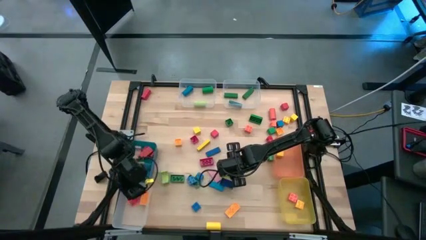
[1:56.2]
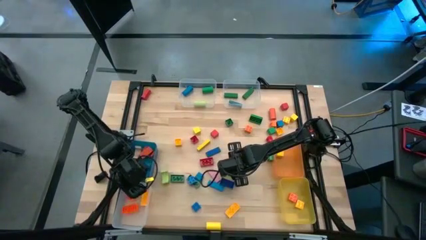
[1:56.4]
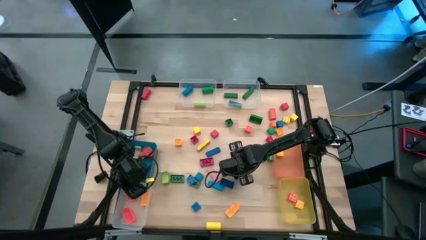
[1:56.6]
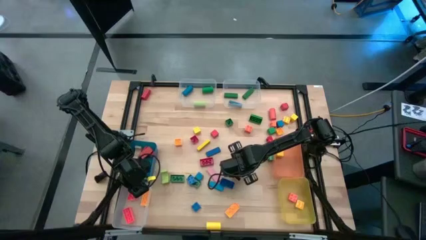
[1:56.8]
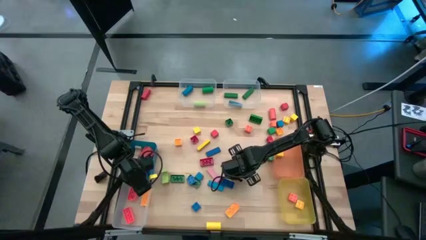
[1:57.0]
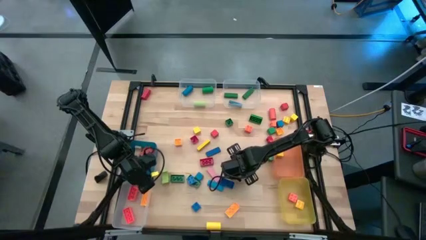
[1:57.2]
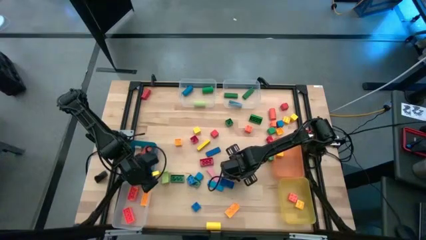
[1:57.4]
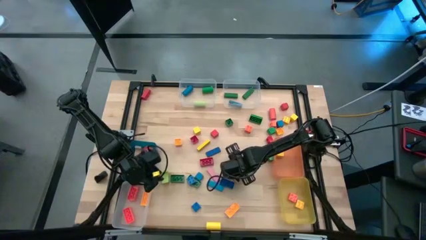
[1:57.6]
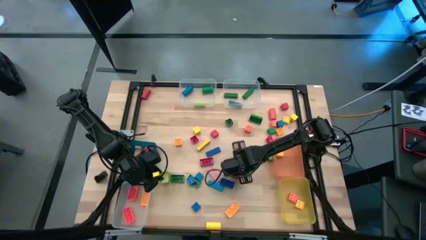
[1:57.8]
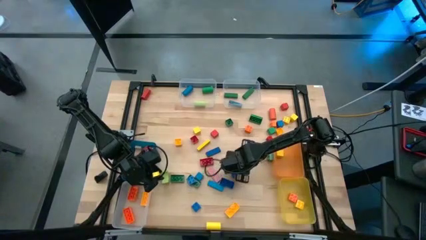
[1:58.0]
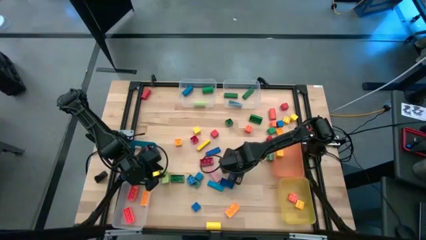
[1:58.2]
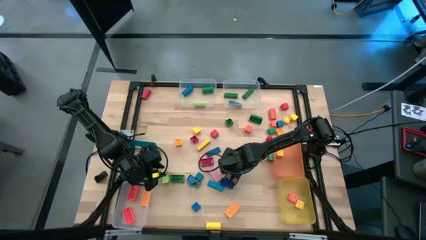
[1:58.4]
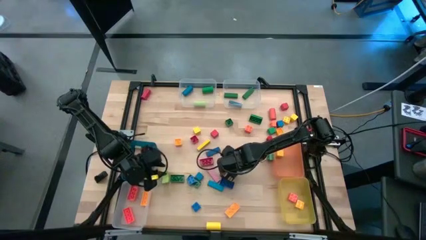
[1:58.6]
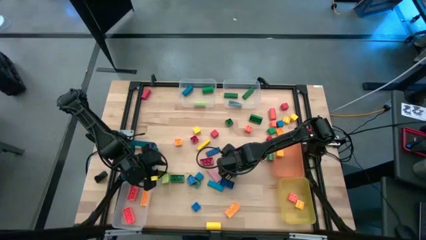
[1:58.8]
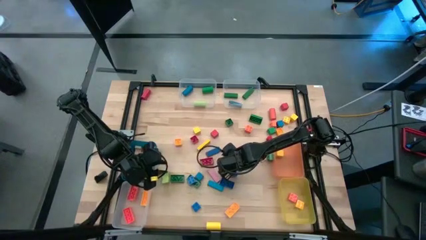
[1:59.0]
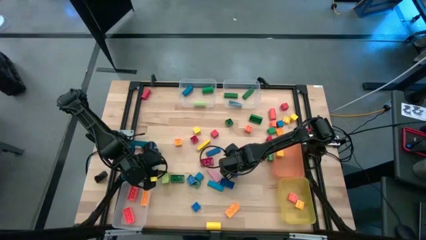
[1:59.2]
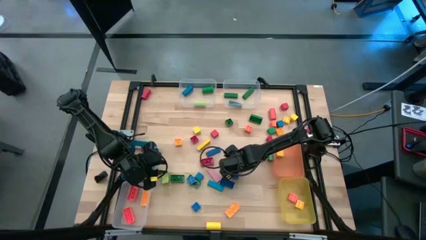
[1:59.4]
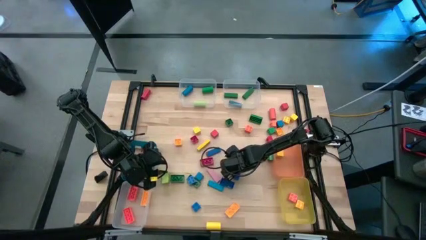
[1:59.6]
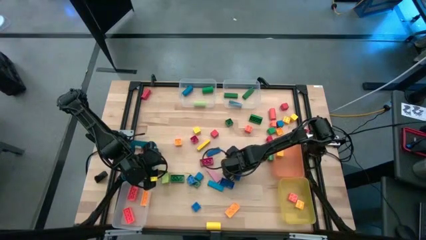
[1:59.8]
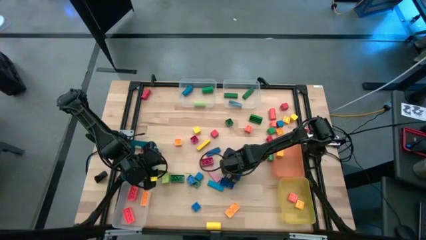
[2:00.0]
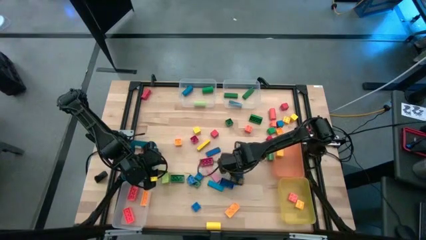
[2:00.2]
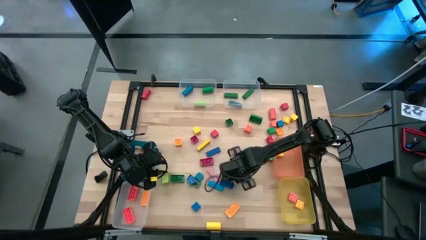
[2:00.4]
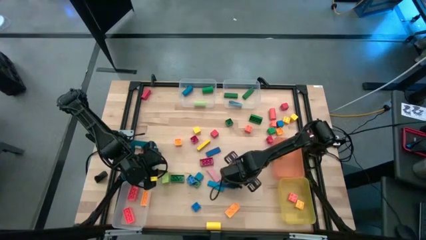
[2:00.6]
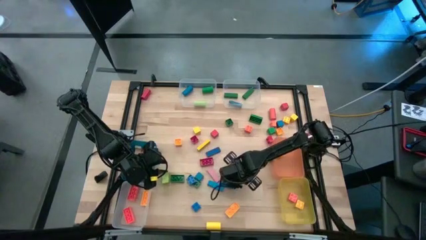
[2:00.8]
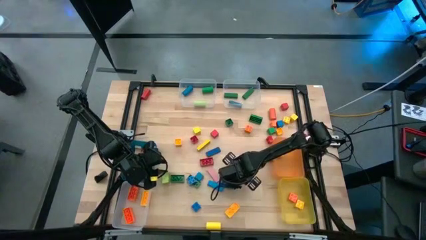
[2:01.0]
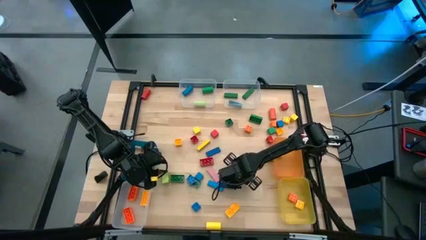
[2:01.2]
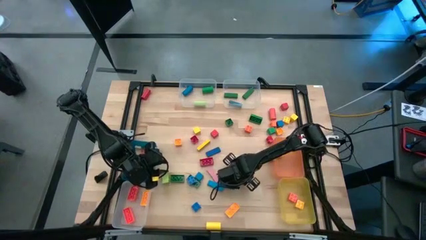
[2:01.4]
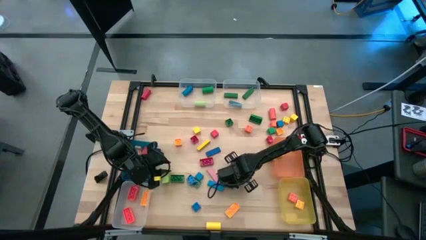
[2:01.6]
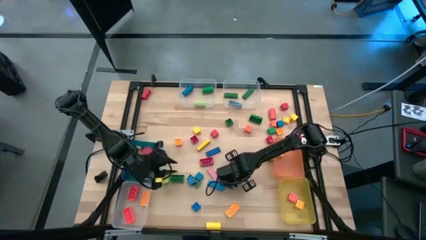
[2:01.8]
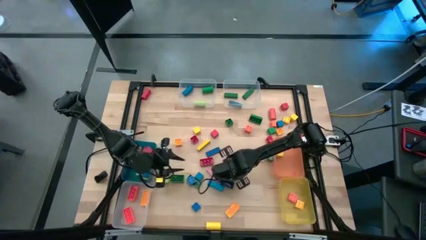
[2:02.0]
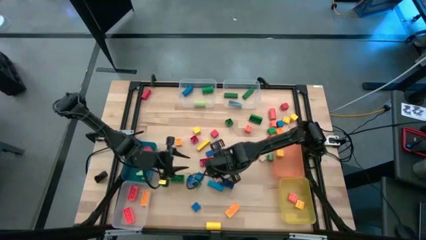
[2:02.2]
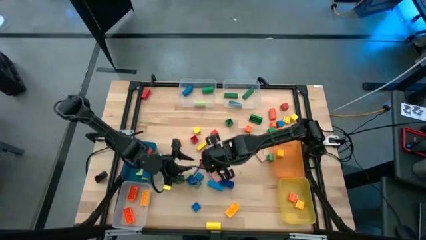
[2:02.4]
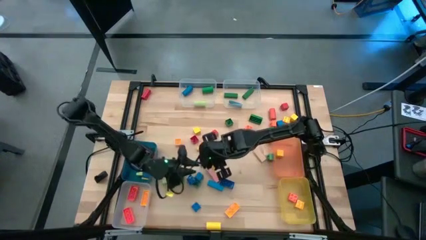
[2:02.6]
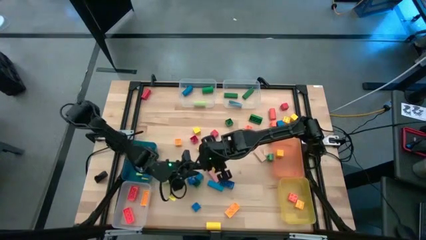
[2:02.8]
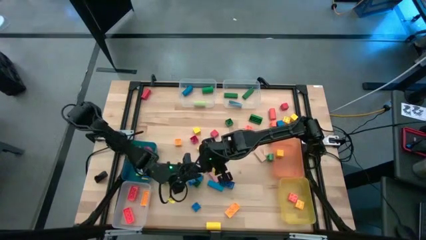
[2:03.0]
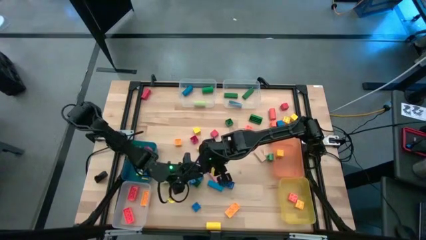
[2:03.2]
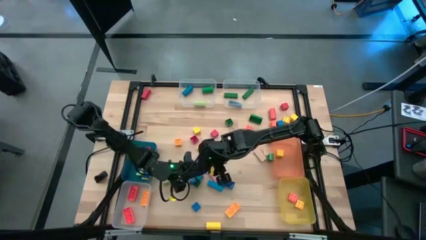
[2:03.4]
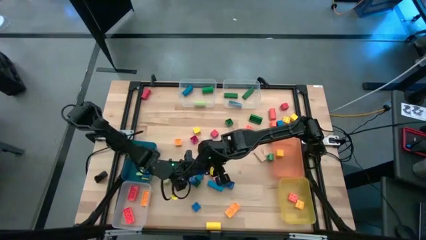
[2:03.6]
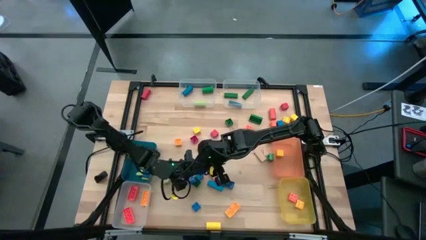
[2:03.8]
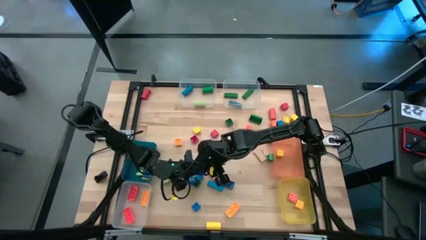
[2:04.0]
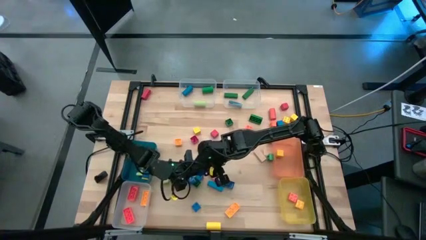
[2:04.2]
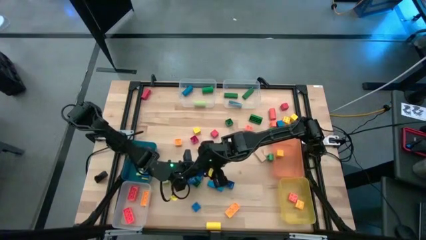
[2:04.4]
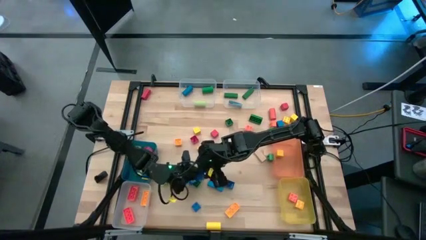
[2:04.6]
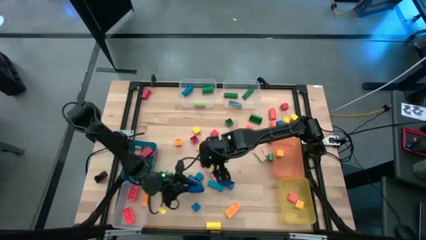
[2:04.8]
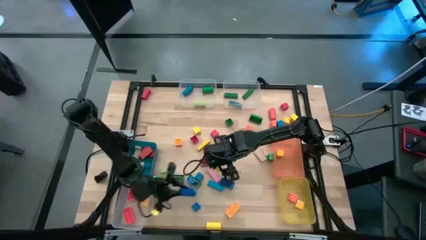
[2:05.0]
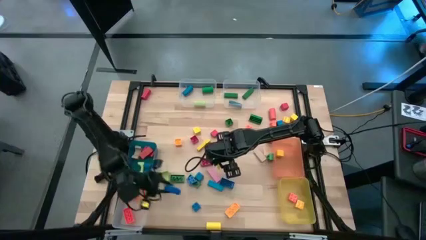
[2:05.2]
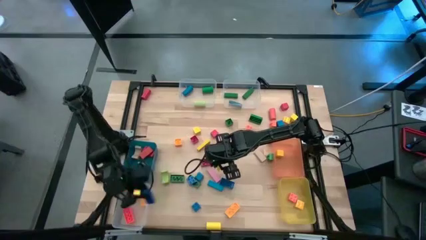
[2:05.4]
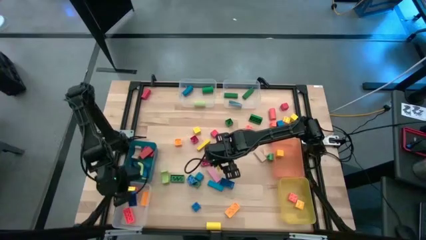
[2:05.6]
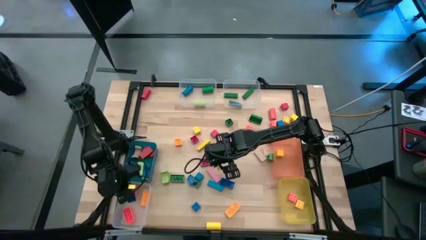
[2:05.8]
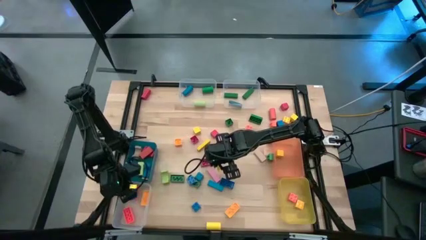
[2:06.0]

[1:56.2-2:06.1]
Task: Sort blocks by size
Put the blue game piece into the bottom left transparent bin

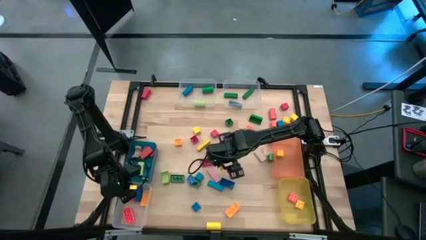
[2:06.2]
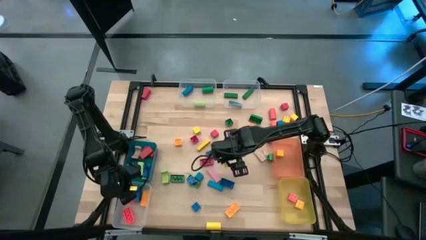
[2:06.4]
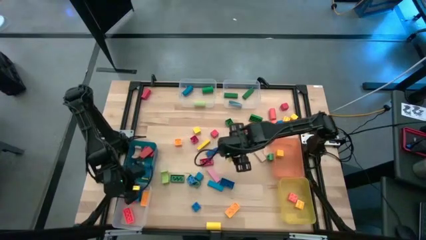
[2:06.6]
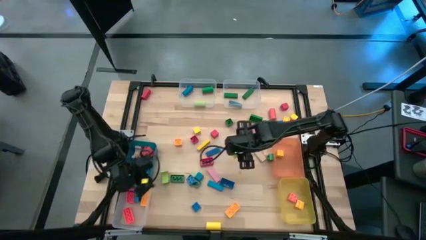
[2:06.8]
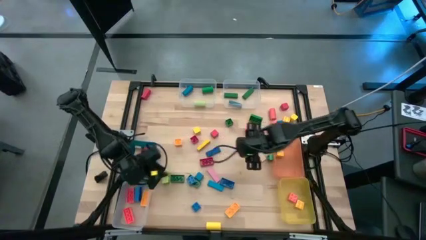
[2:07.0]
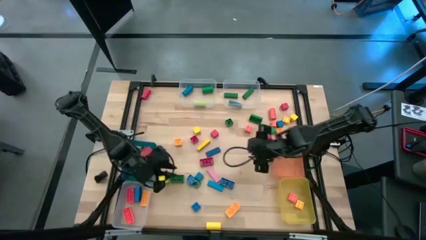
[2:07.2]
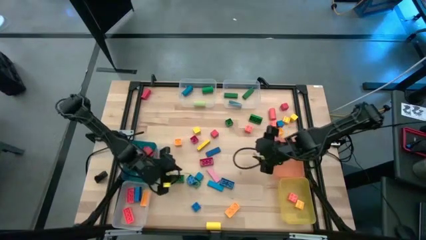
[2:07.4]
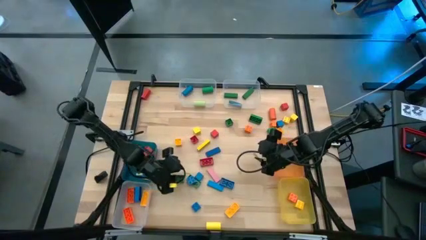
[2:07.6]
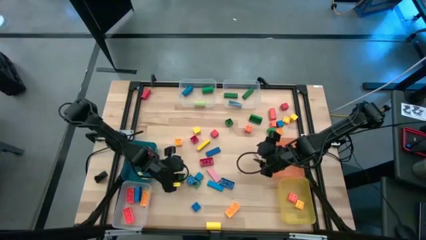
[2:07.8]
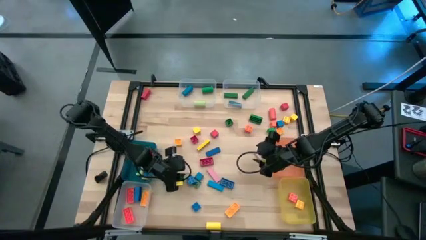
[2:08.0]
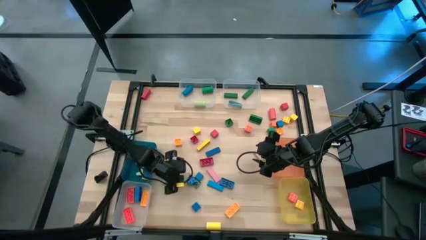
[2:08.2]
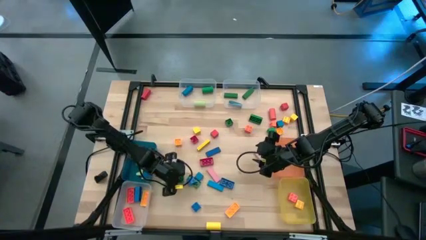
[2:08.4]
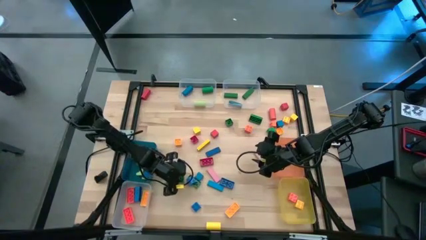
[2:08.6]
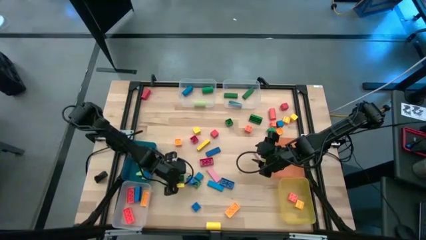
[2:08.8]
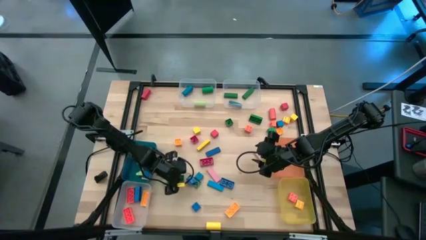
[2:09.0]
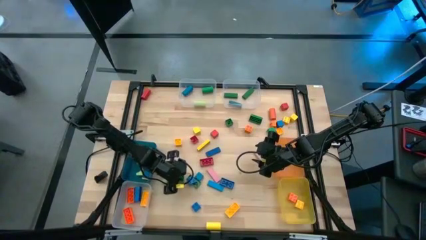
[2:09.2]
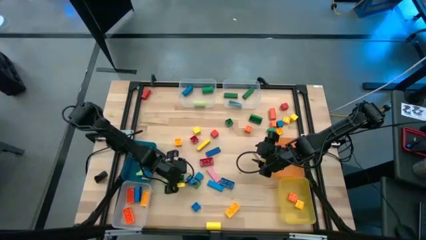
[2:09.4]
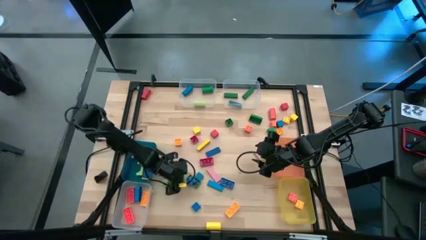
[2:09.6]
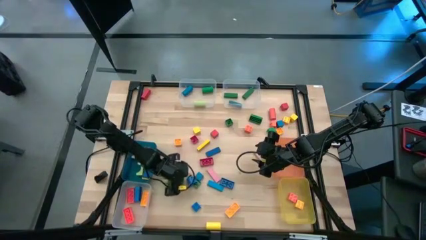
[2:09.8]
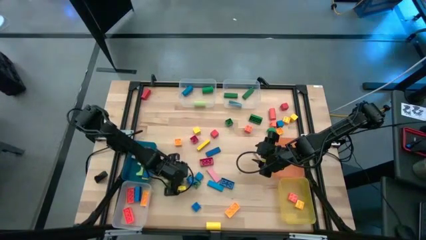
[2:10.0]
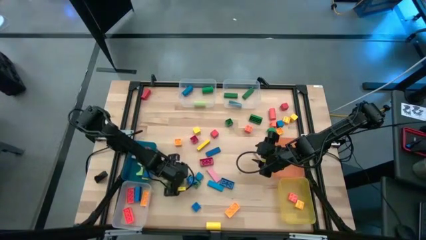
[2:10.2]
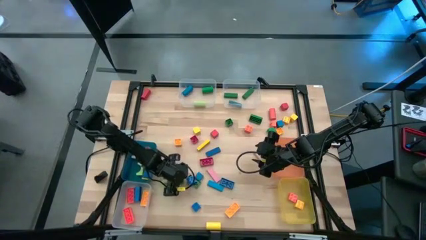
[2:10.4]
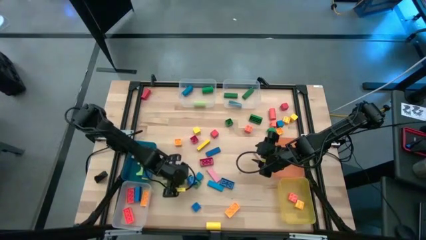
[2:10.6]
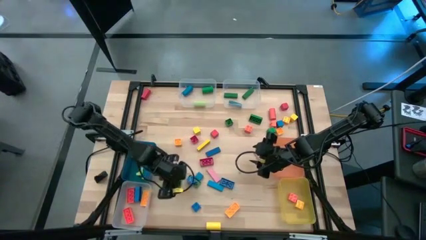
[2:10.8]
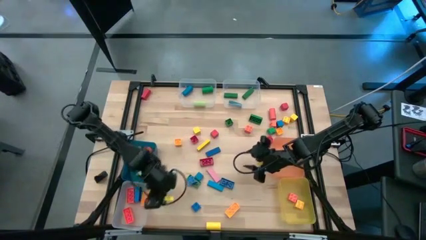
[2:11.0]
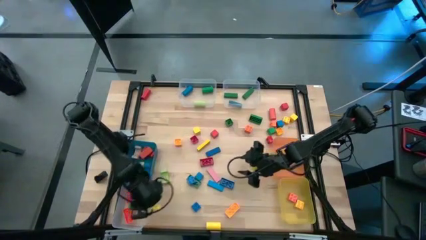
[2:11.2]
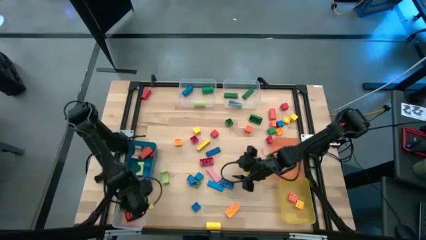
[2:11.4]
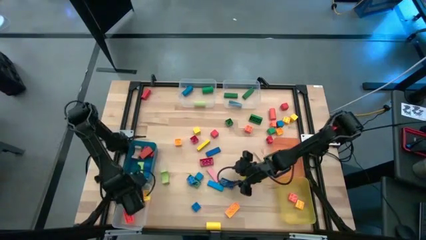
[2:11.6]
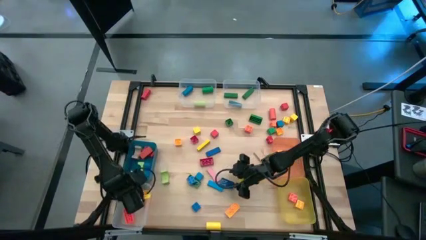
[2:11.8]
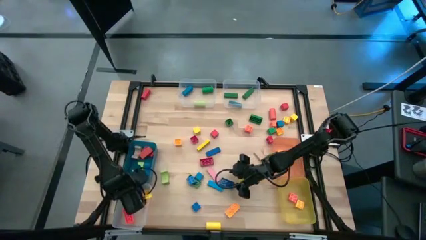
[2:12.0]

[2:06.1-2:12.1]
Put the green game piece into the bottom left transparent bin
